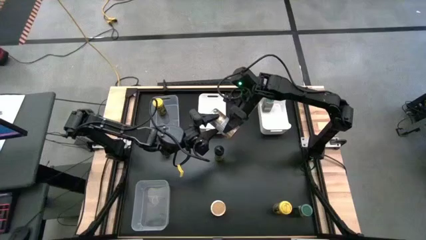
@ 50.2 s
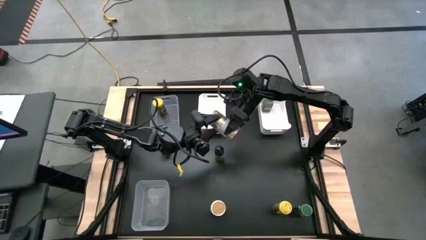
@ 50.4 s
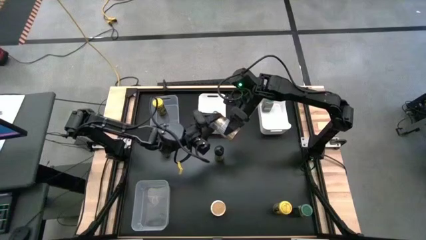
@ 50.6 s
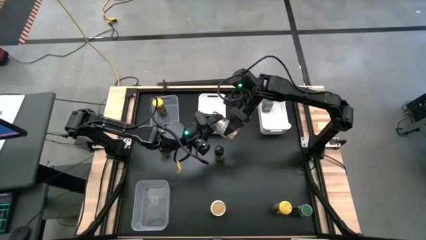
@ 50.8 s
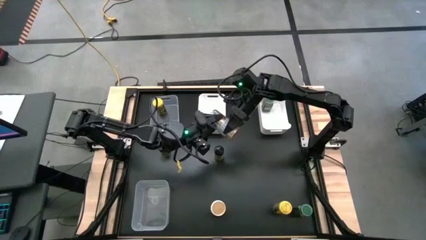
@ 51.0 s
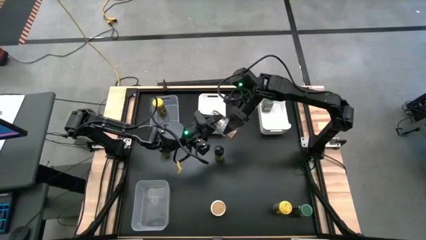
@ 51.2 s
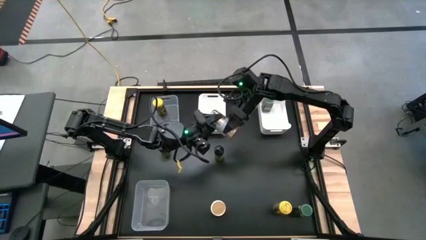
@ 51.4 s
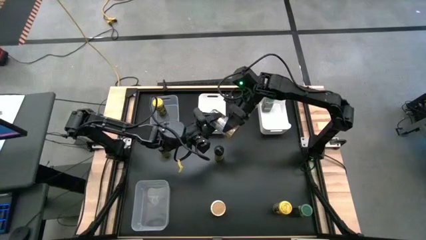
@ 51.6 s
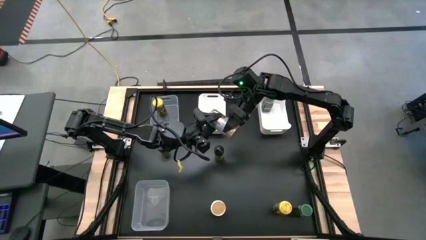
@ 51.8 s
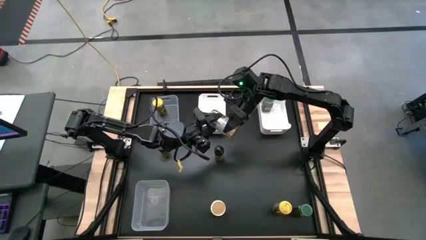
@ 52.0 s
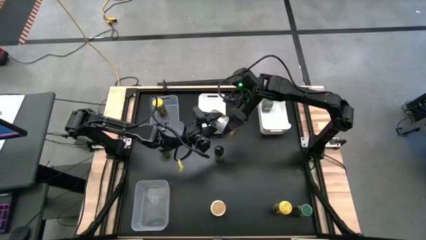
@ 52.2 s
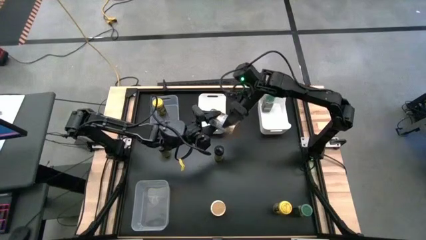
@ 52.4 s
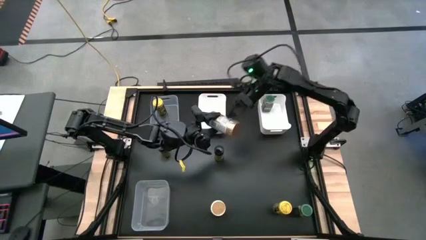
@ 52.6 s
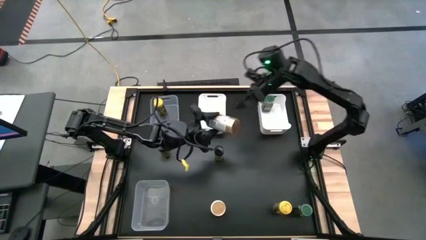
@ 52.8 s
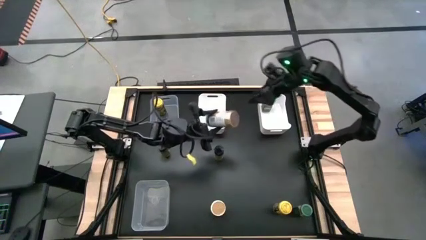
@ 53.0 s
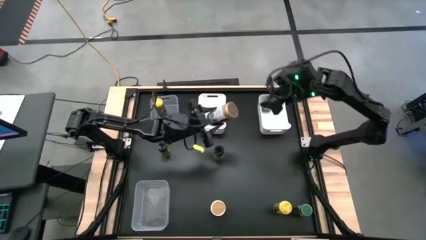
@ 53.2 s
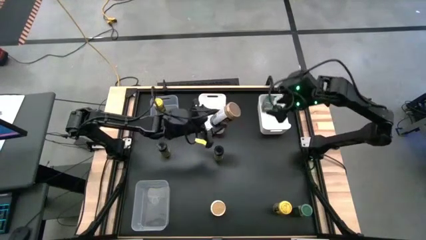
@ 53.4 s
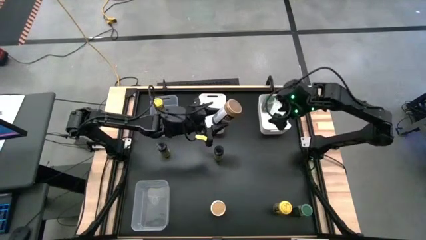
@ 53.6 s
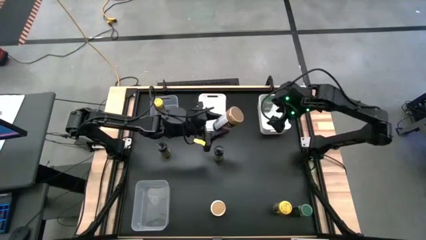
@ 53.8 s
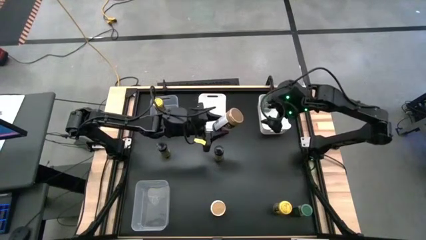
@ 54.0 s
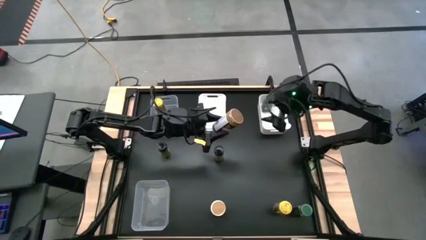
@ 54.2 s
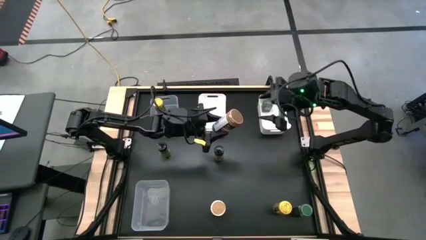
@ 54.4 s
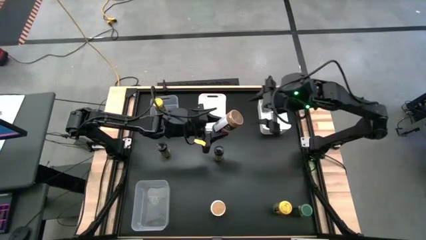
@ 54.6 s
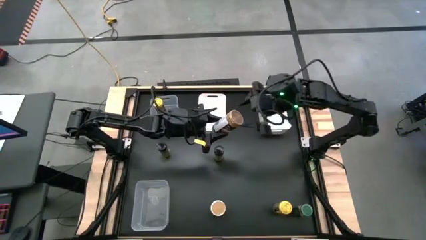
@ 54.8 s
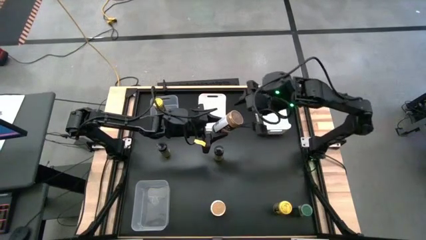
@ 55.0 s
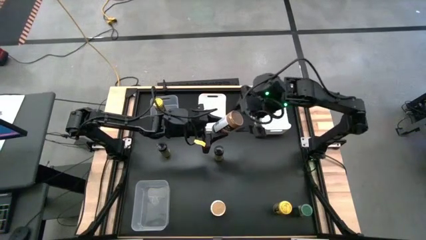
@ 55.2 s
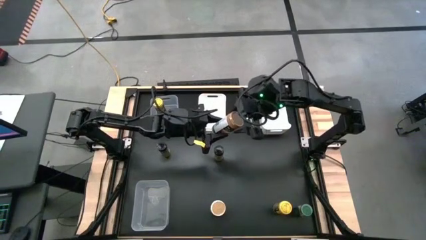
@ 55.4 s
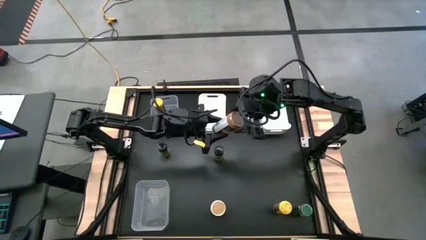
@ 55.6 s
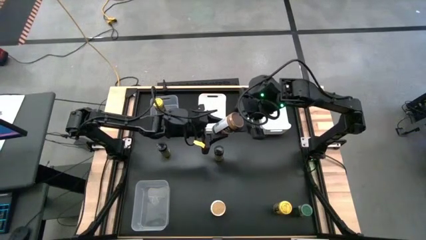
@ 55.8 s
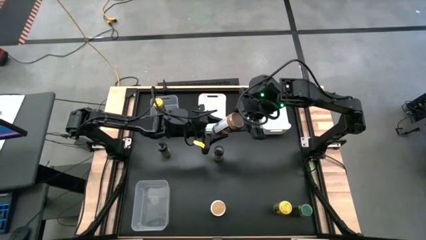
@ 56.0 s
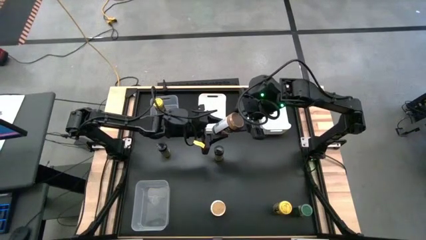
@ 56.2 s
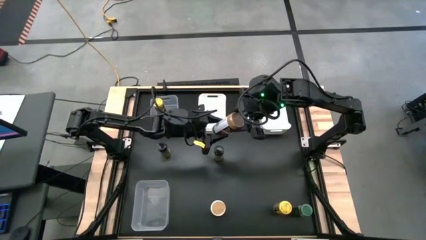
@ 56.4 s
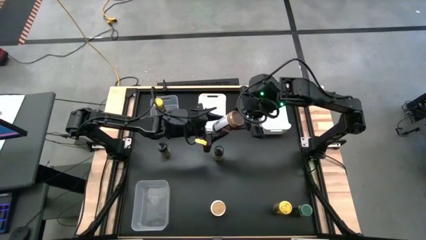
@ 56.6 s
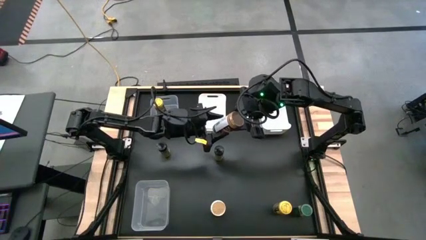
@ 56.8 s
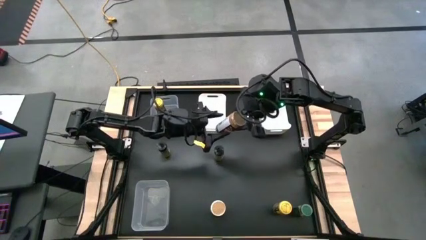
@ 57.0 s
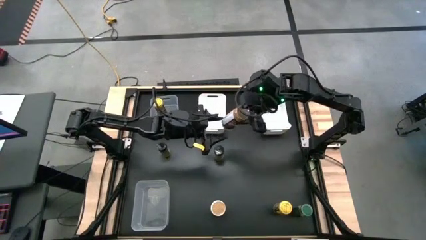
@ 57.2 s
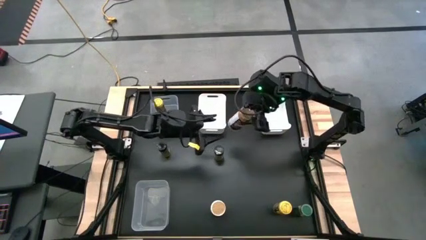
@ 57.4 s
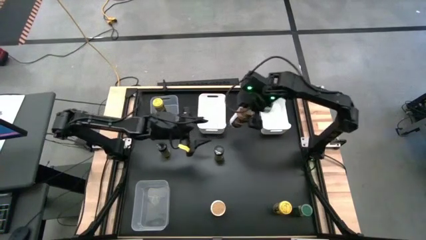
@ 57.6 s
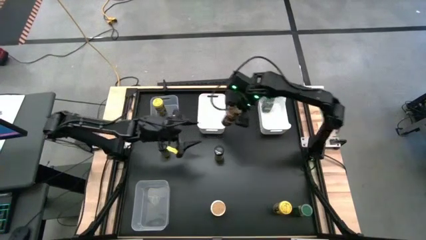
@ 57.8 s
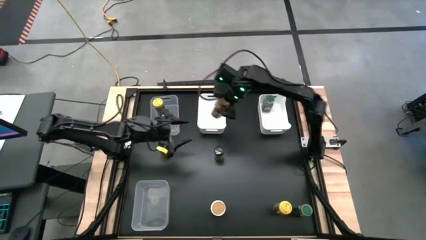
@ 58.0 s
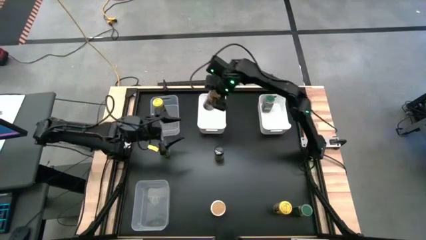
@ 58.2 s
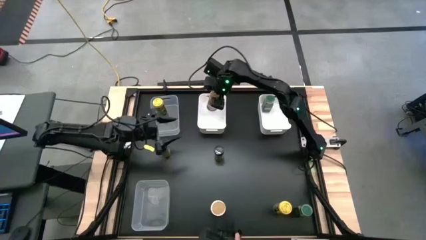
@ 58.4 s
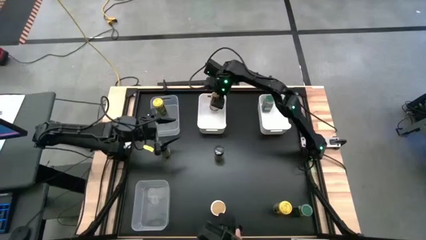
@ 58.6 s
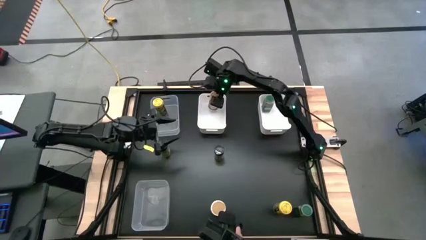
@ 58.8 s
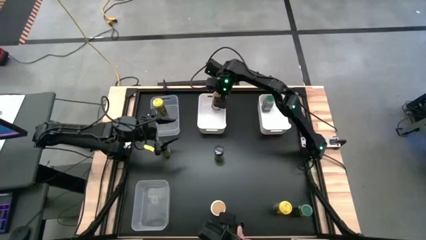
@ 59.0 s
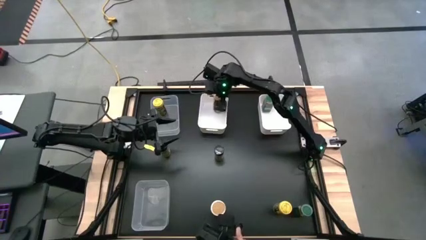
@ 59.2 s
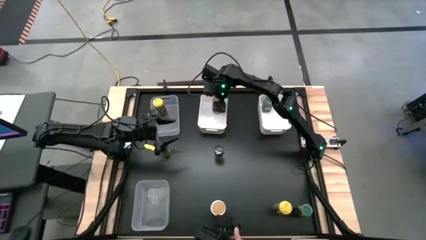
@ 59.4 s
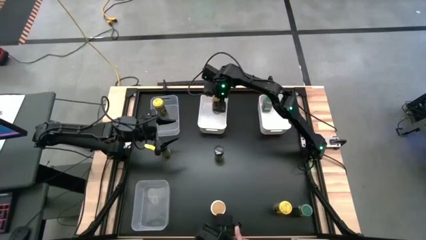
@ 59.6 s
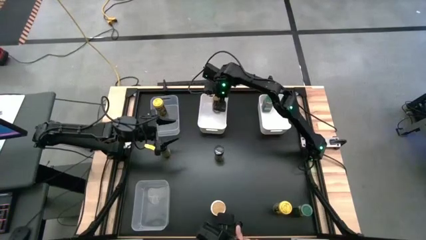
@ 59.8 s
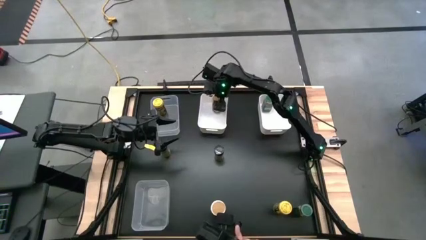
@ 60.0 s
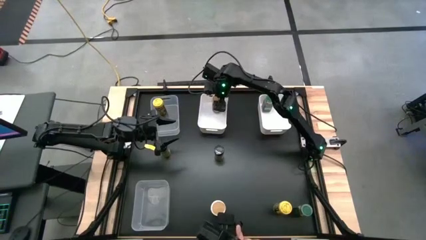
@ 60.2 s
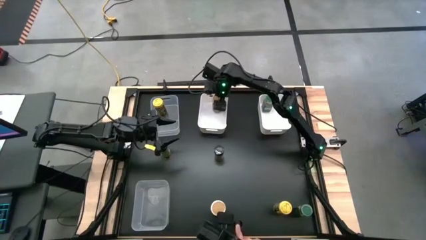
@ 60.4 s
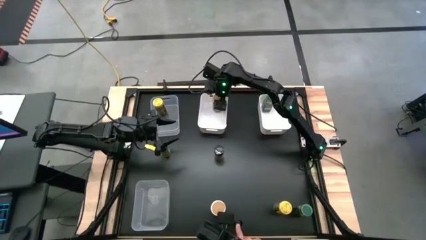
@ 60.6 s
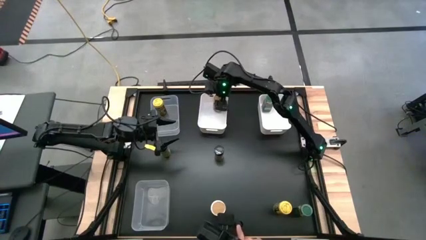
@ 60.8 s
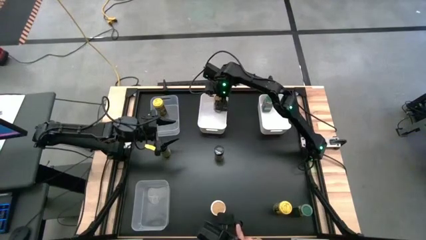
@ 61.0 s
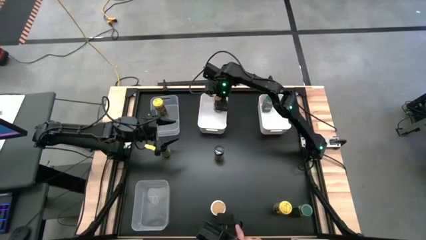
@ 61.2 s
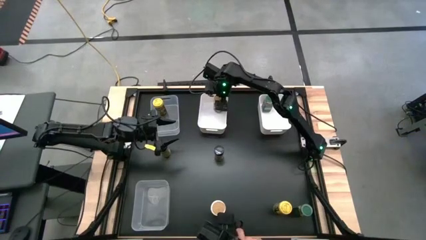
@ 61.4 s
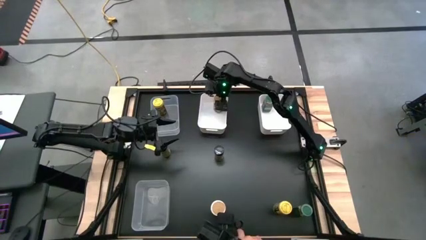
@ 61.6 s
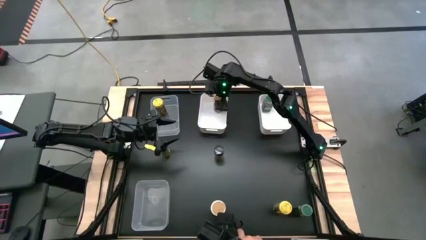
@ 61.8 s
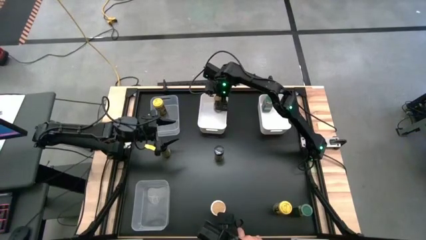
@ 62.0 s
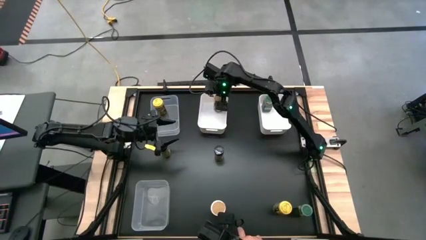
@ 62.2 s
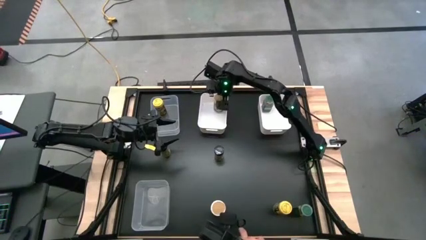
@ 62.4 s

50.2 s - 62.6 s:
Task: Sort spices by type
Put the top gold spice bottle into the left white bin
